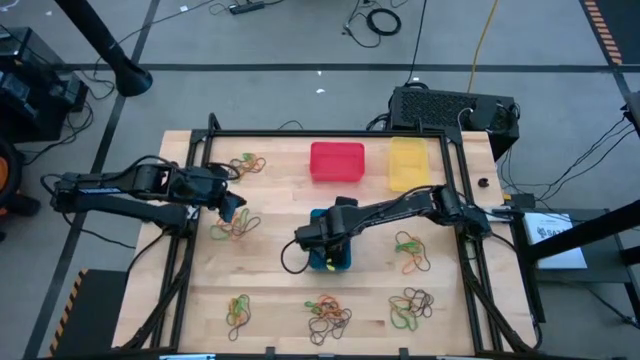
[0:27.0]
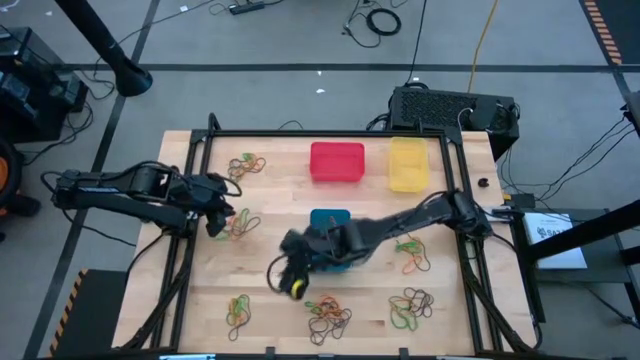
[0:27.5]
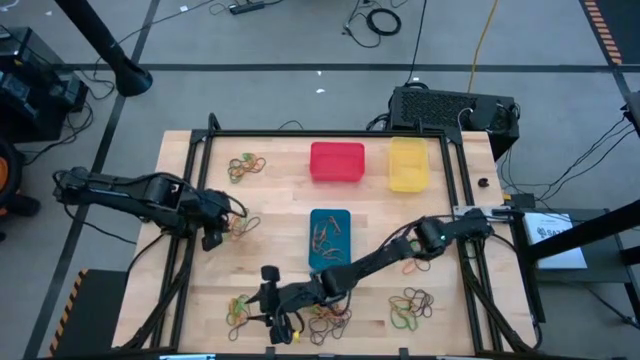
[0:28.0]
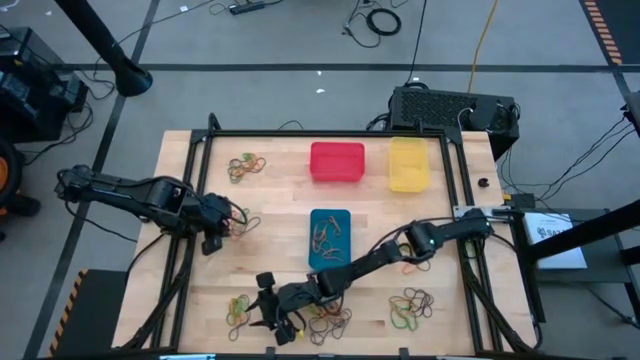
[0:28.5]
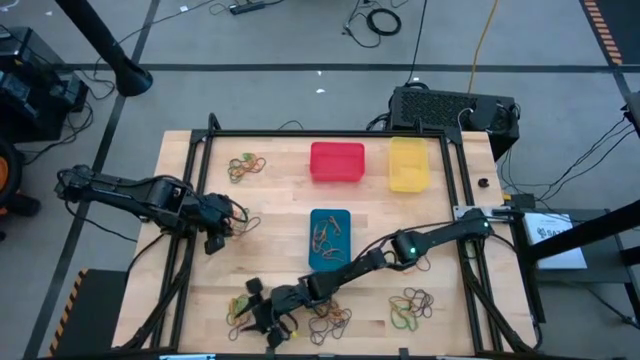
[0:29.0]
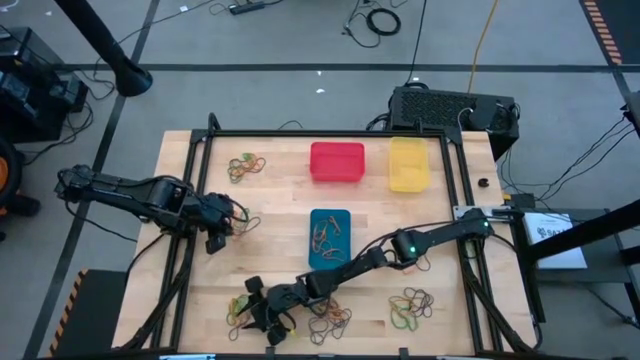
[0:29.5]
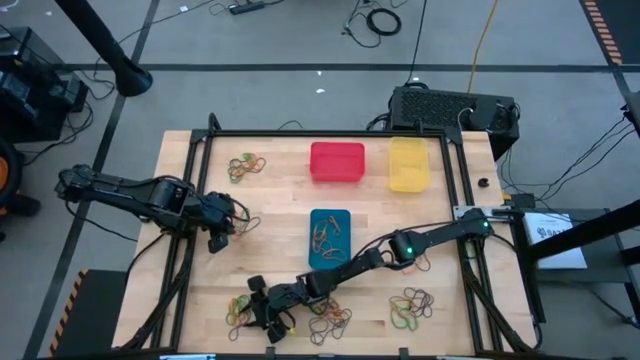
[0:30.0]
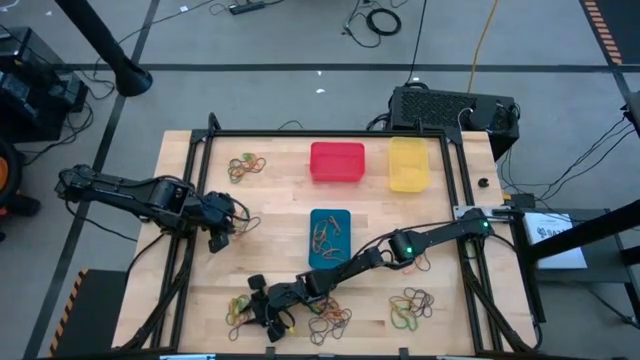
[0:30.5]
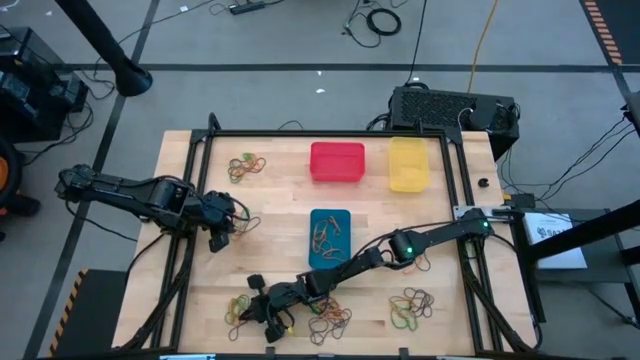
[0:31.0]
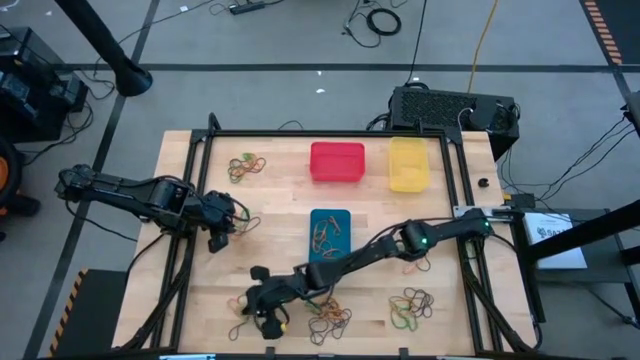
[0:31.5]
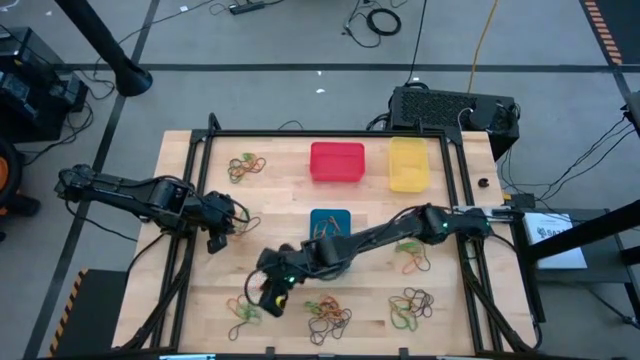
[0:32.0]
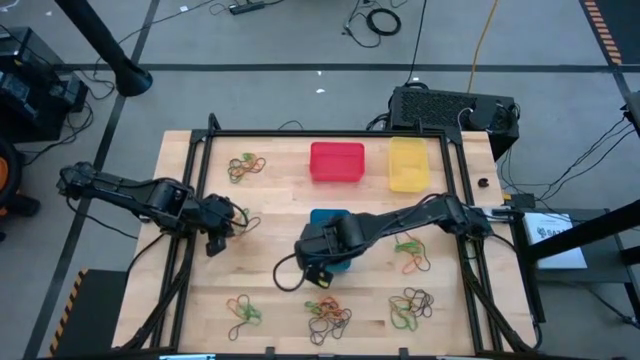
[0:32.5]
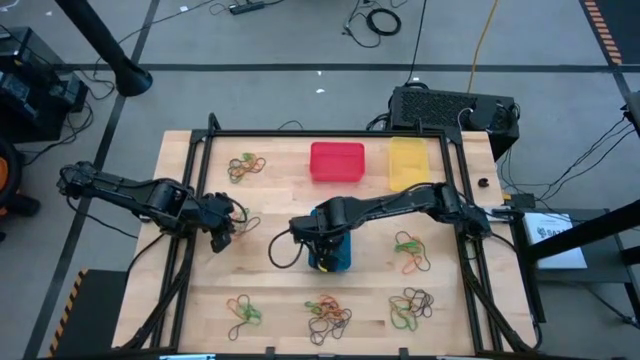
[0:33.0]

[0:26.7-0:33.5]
Task: Sort rubber bands into baskets
Put the orange rubber band into the blue bin

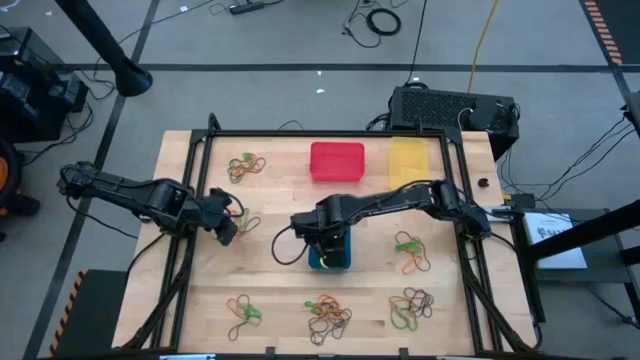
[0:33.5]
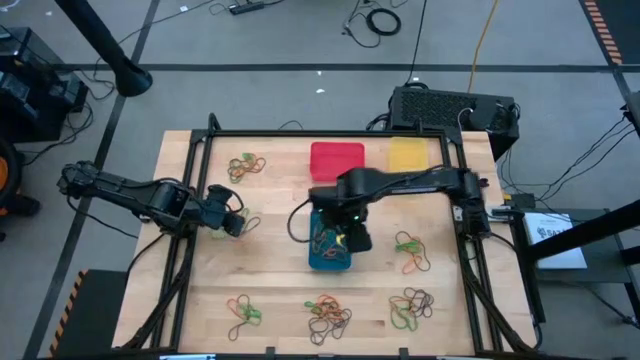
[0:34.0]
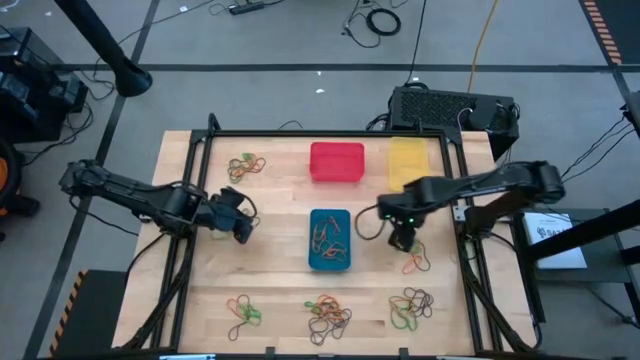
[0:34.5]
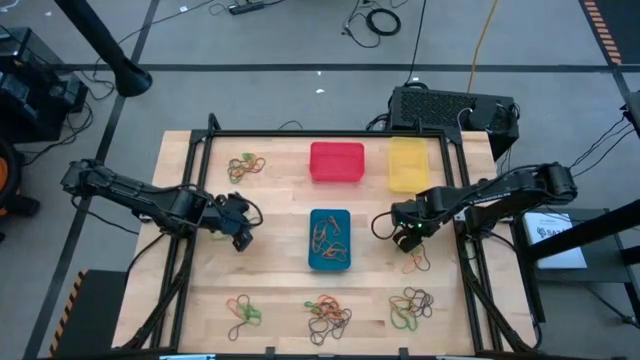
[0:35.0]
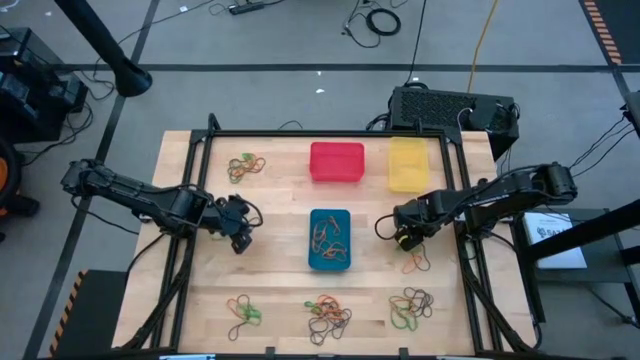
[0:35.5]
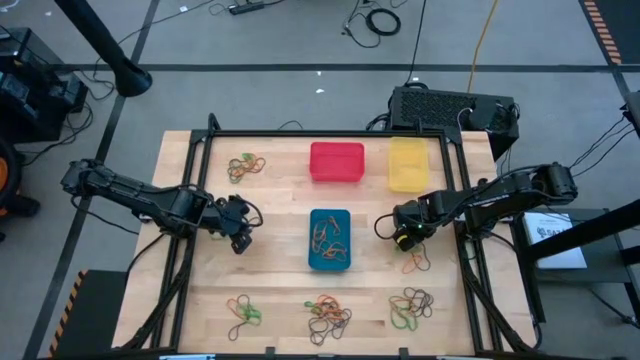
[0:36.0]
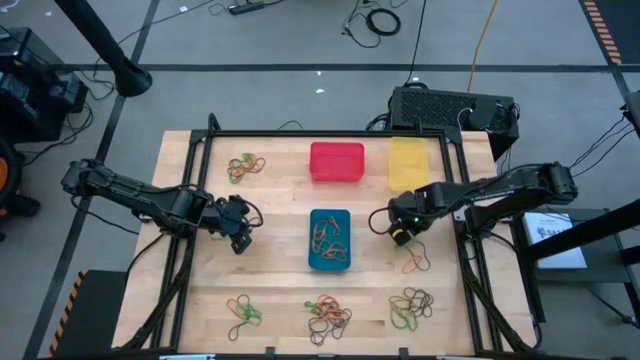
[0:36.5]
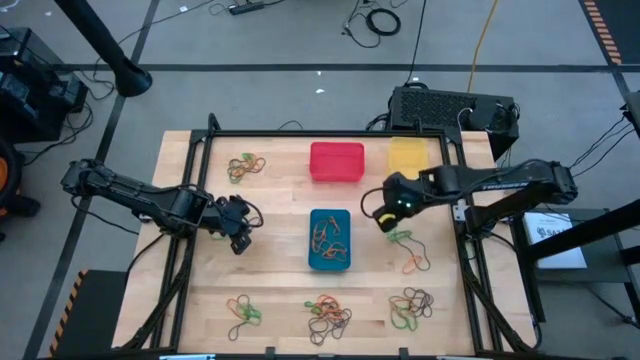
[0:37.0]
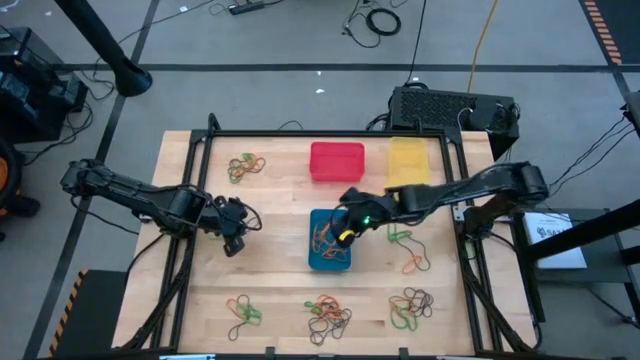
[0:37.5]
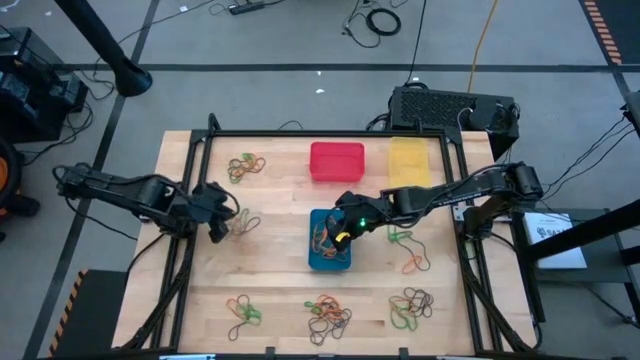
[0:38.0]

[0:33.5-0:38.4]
Put the orange rubber band into the blue bin

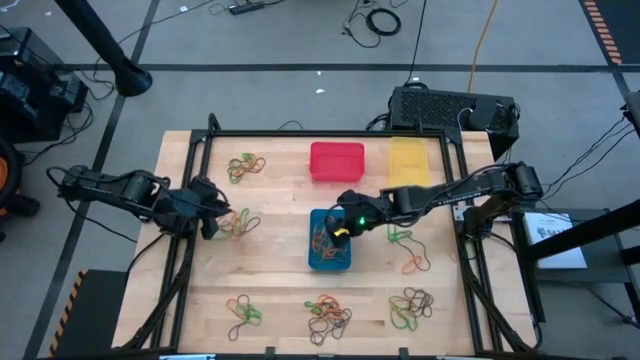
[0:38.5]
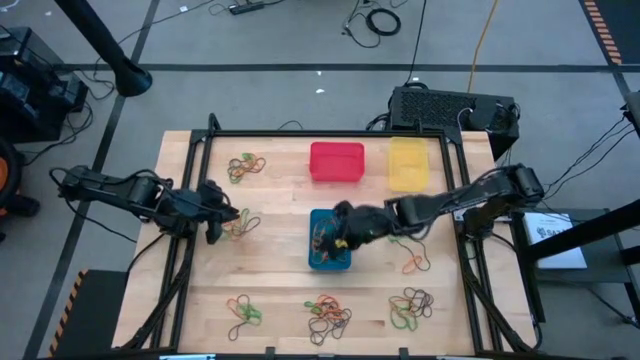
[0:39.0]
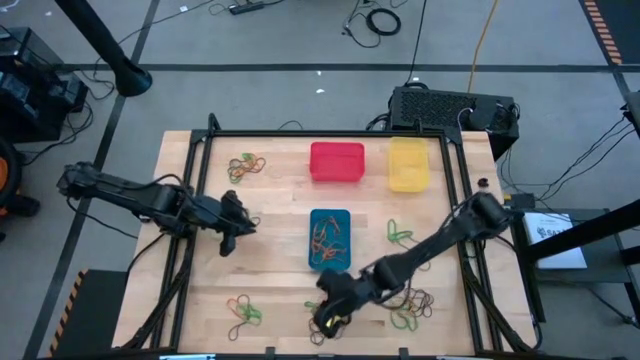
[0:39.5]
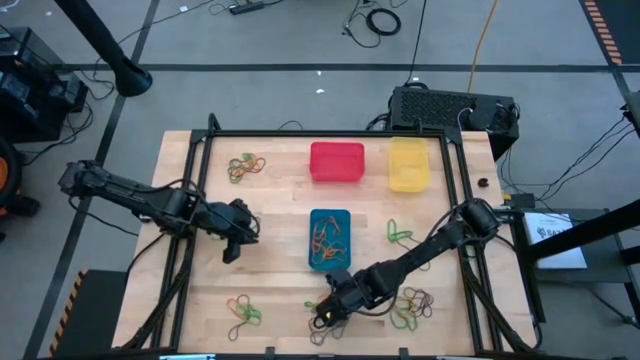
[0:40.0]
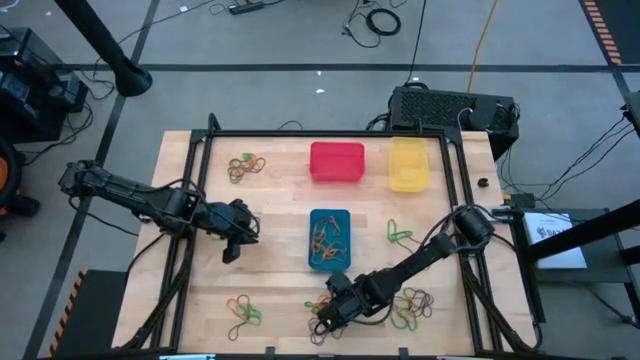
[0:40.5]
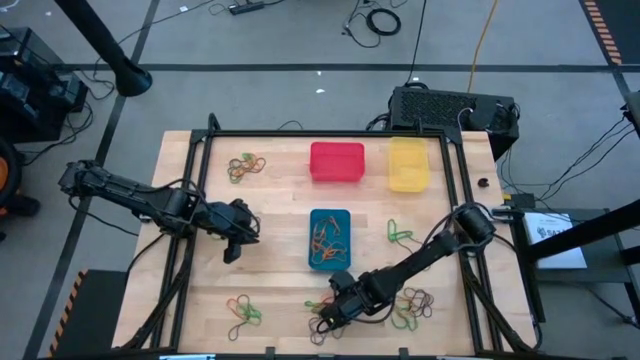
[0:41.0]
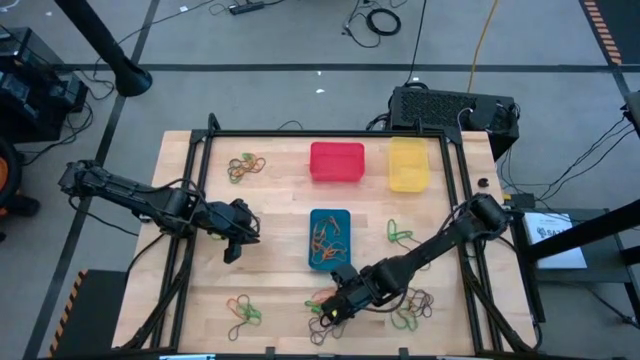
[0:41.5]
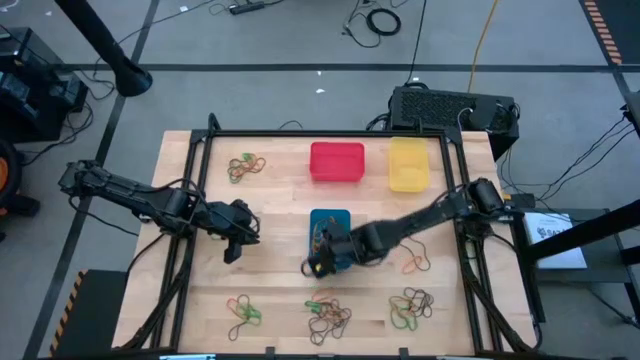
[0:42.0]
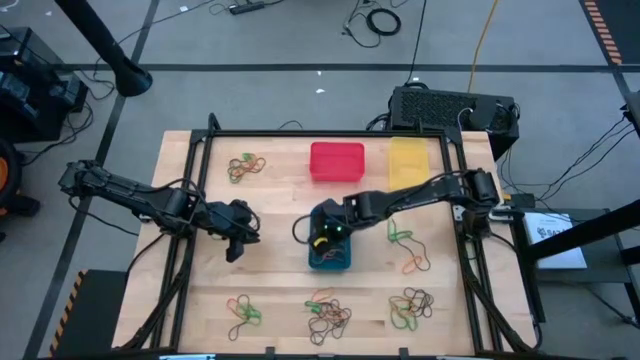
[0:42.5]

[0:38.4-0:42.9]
Put the orange rubber band into the blue bin

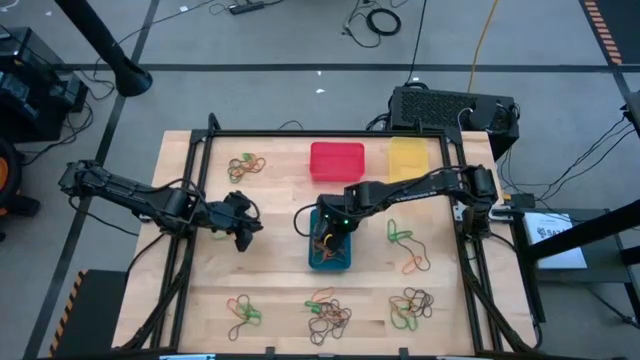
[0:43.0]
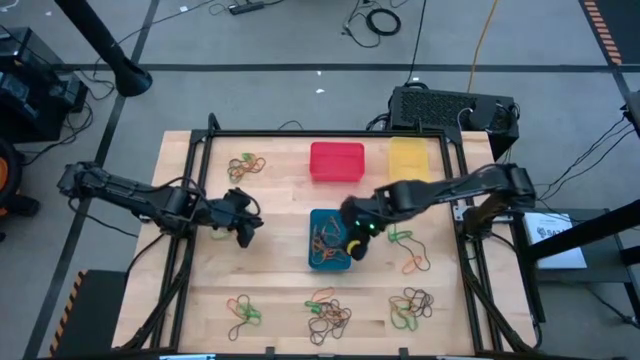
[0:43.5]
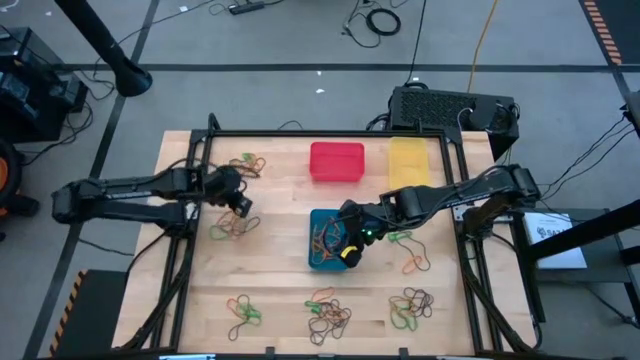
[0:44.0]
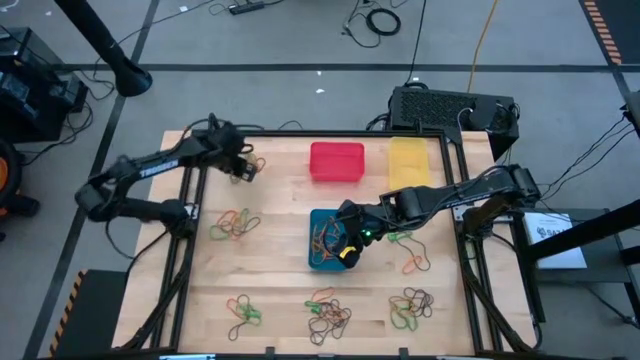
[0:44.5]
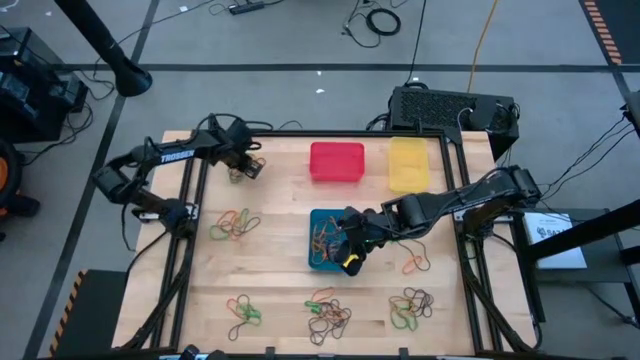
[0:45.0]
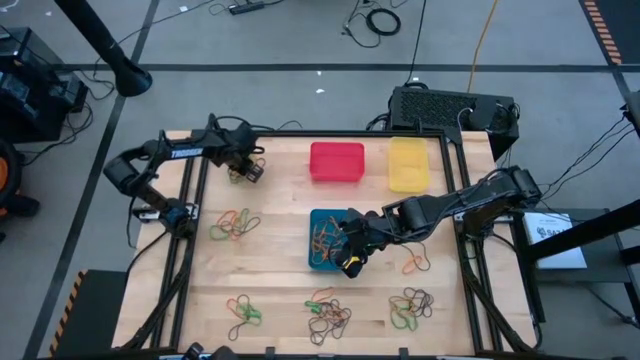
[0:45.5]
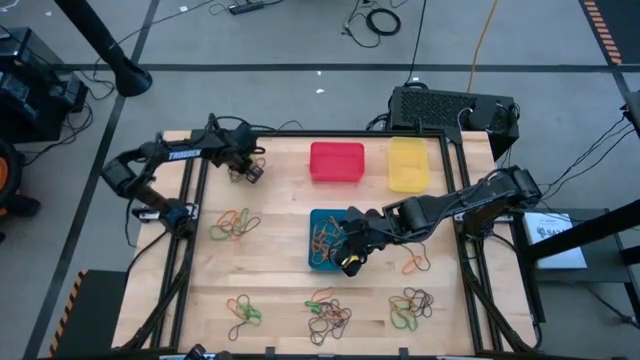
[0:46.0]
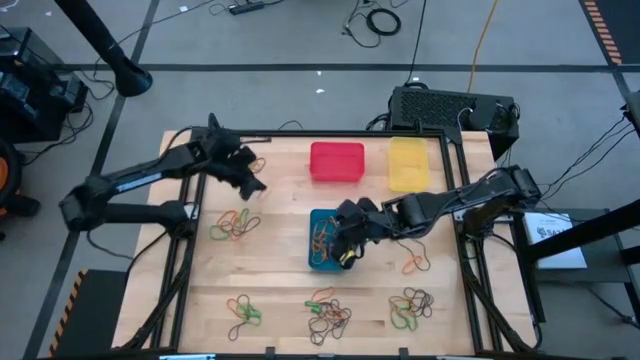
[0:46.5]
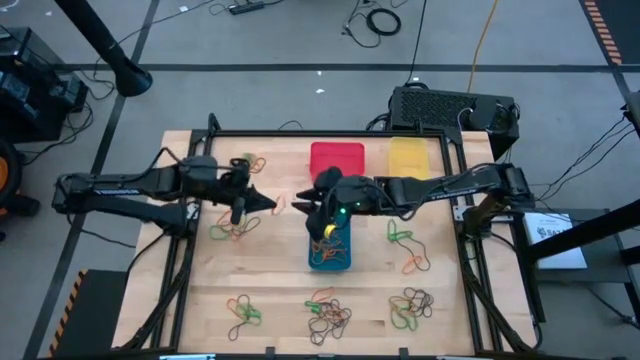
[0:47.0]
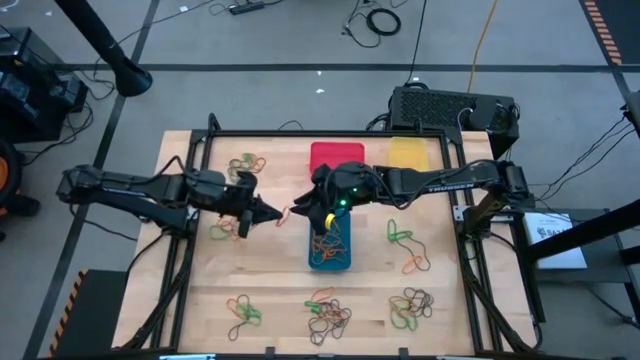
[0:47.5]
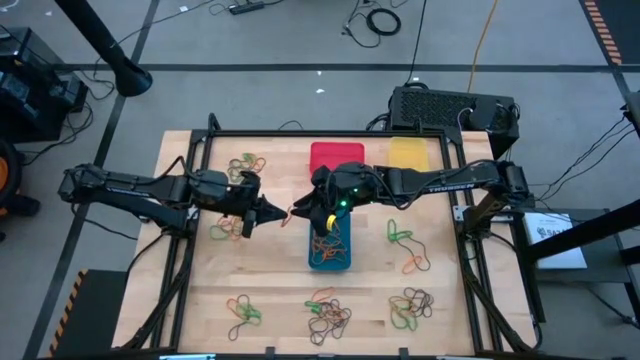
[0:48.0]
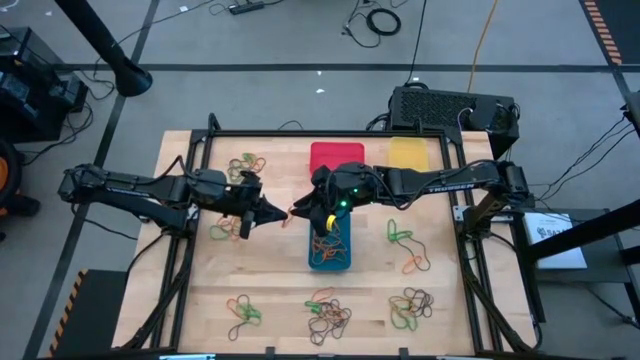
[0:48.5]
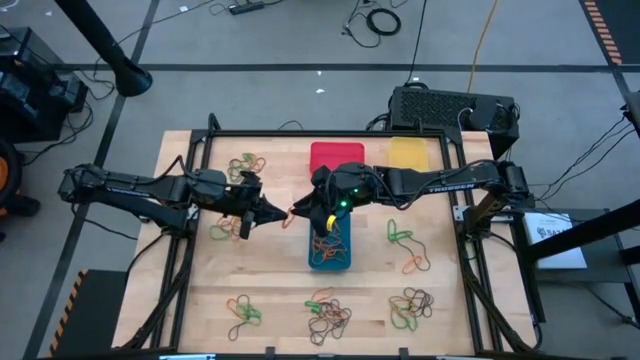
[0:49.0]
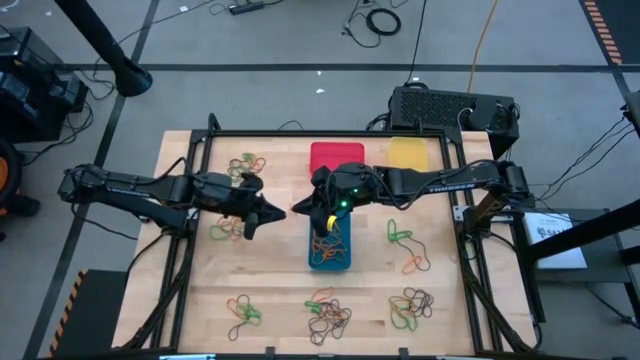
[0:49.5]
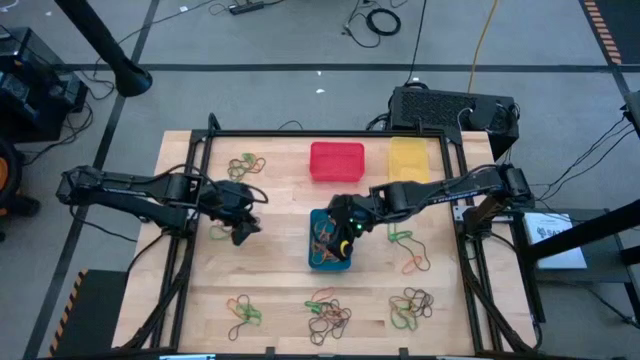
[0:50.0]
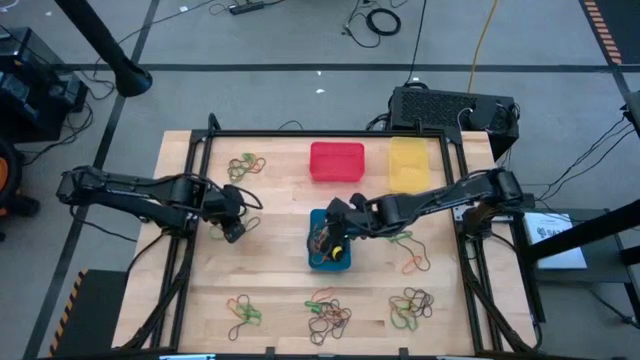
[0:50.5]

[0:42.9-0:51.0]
Put the orange rubber band into the blue bin
